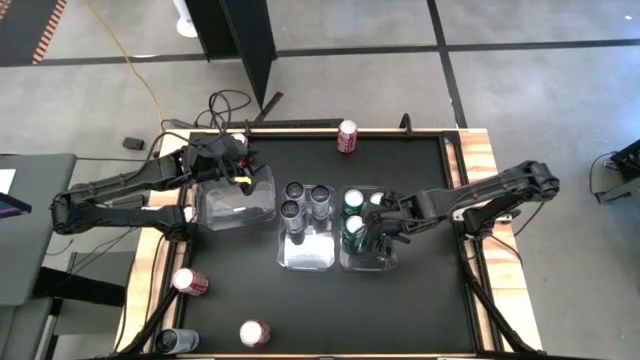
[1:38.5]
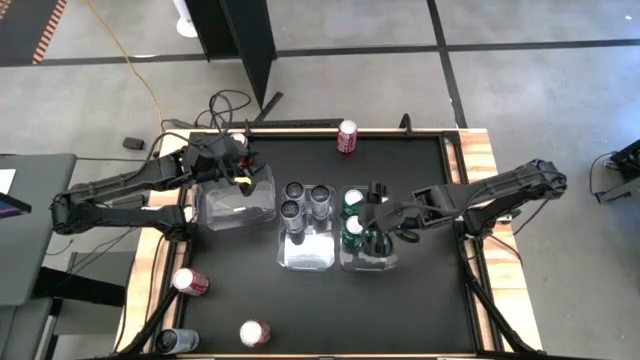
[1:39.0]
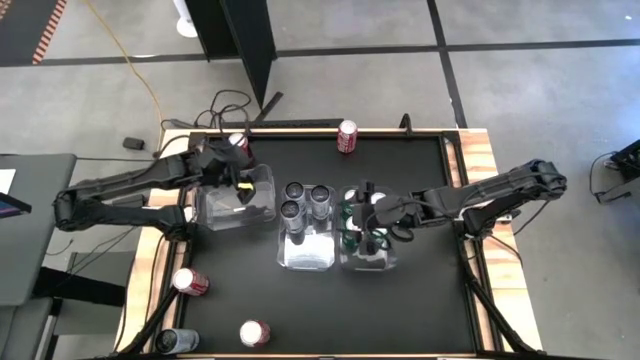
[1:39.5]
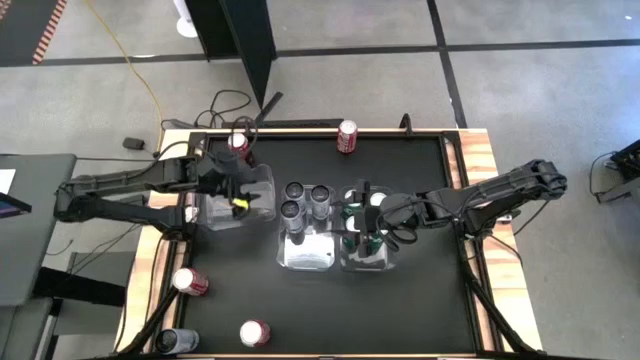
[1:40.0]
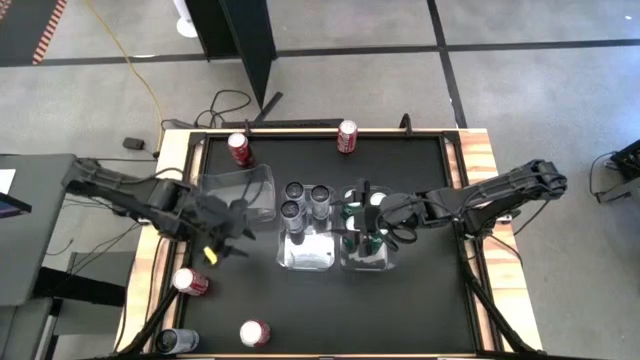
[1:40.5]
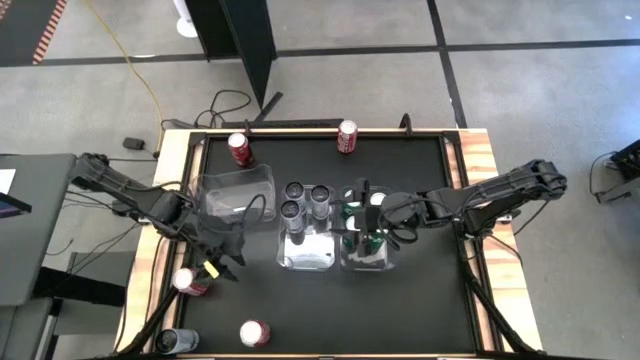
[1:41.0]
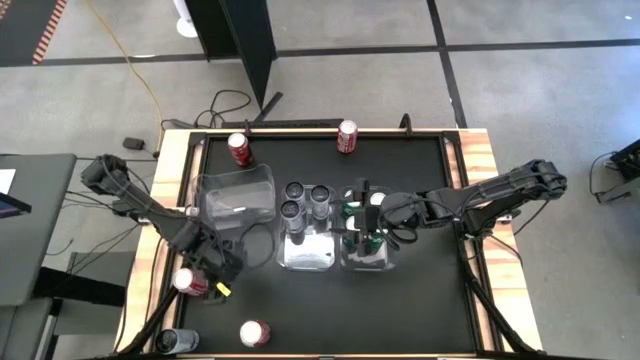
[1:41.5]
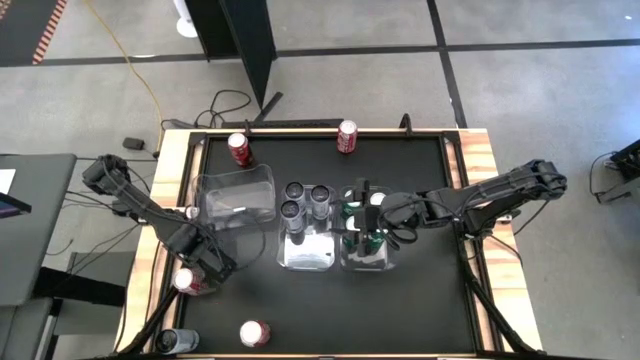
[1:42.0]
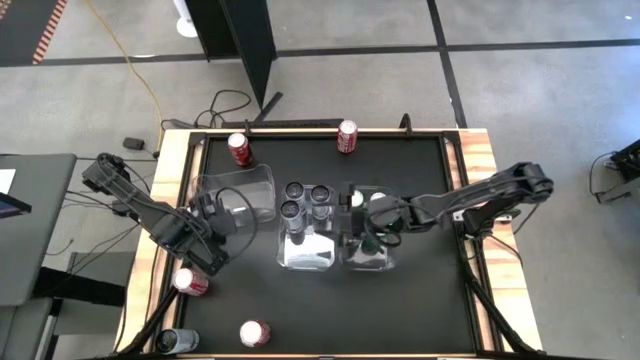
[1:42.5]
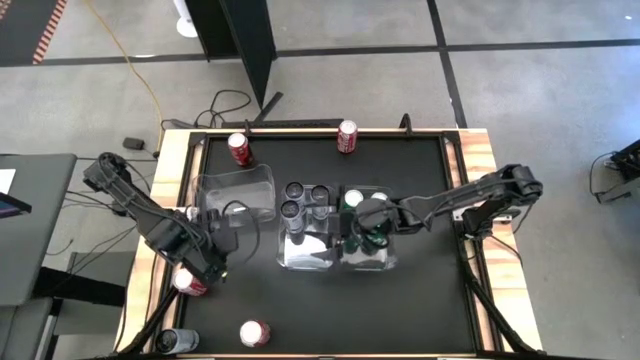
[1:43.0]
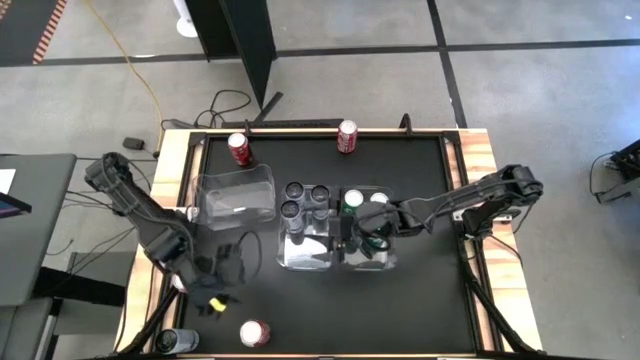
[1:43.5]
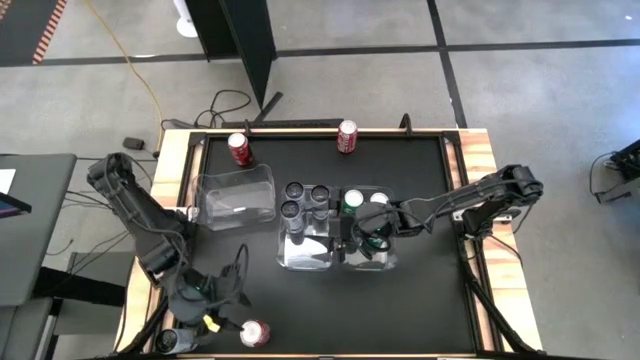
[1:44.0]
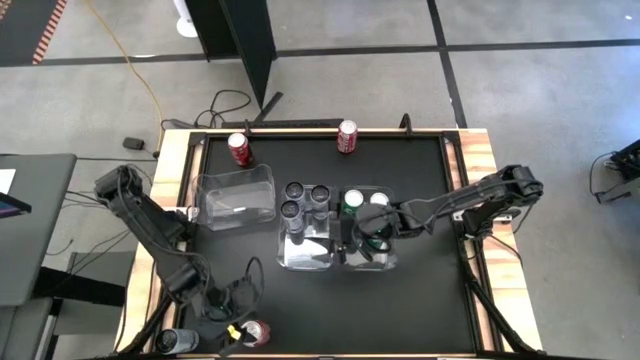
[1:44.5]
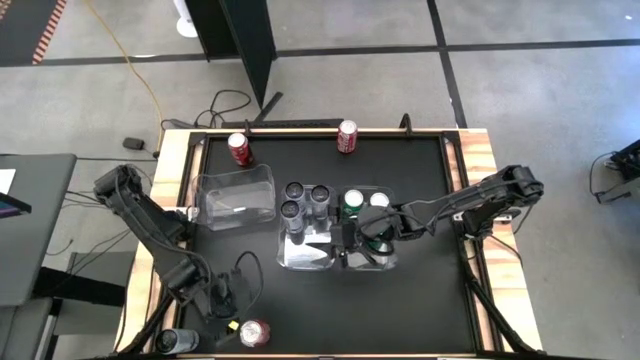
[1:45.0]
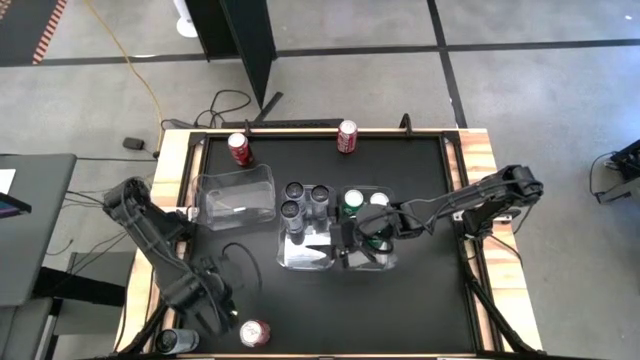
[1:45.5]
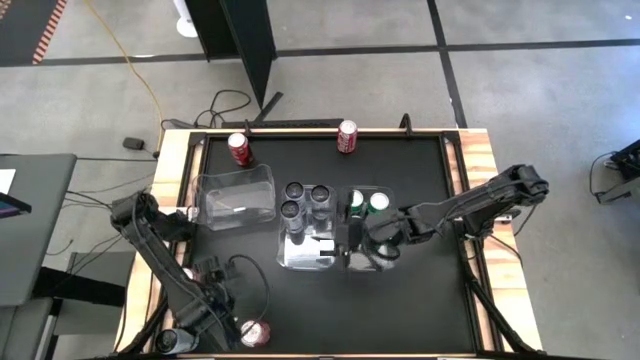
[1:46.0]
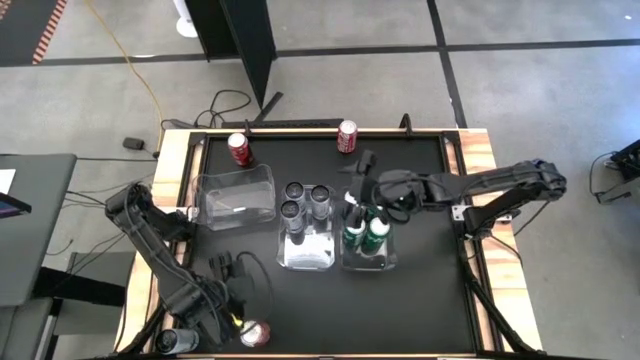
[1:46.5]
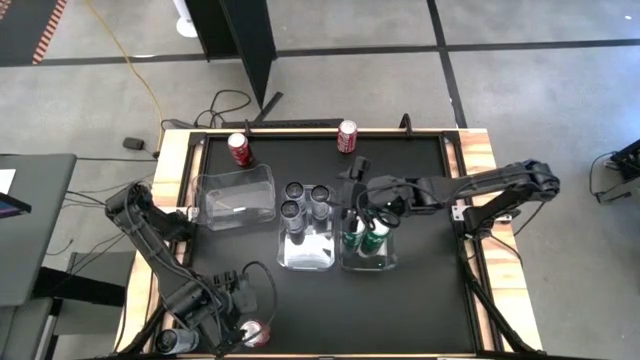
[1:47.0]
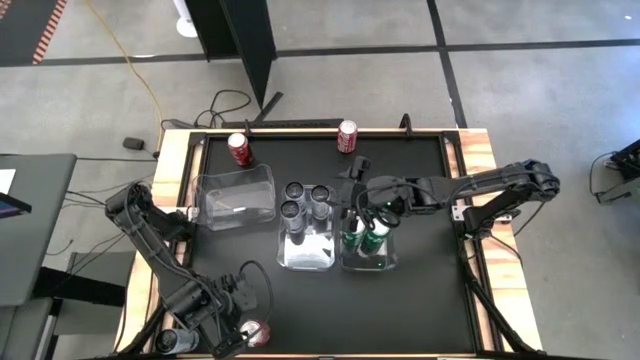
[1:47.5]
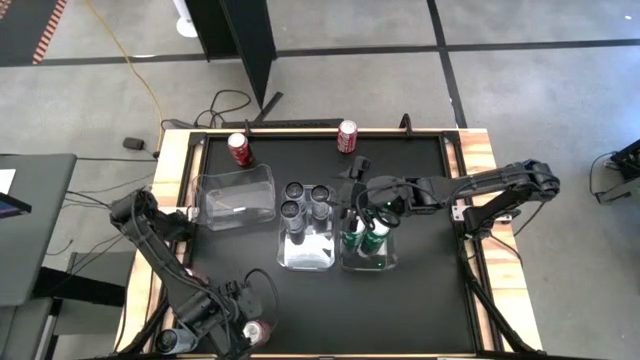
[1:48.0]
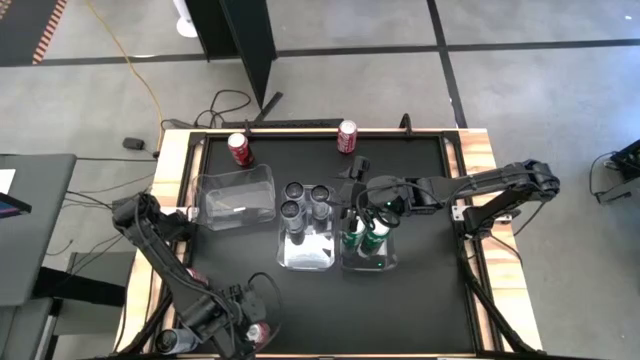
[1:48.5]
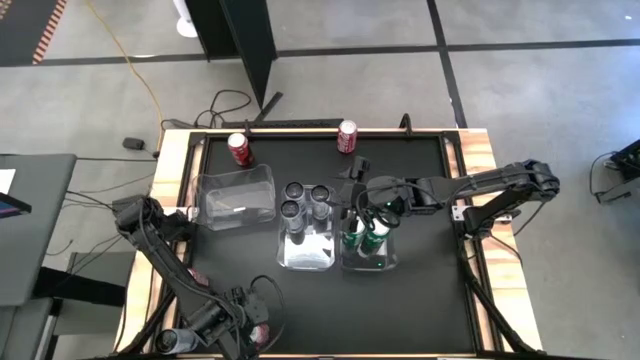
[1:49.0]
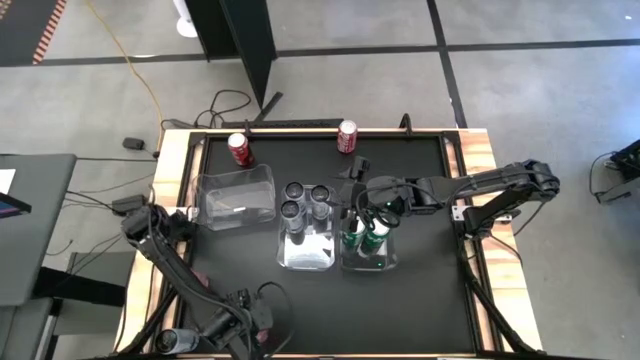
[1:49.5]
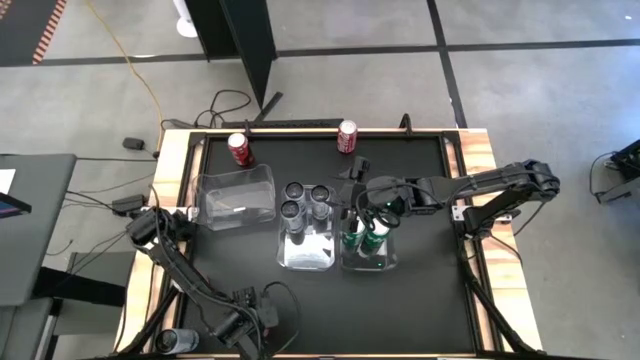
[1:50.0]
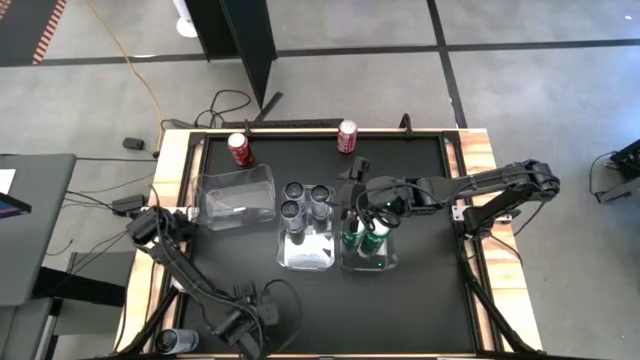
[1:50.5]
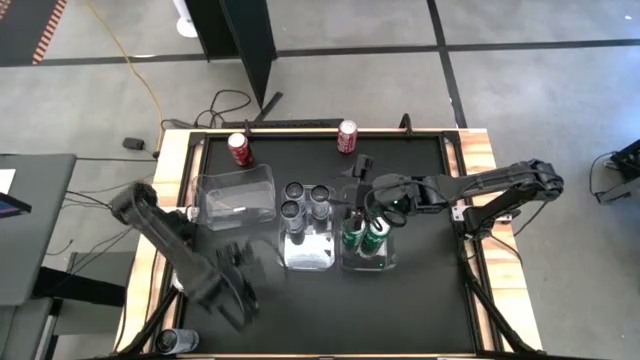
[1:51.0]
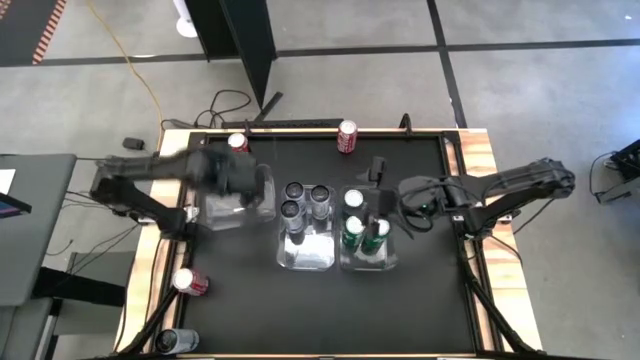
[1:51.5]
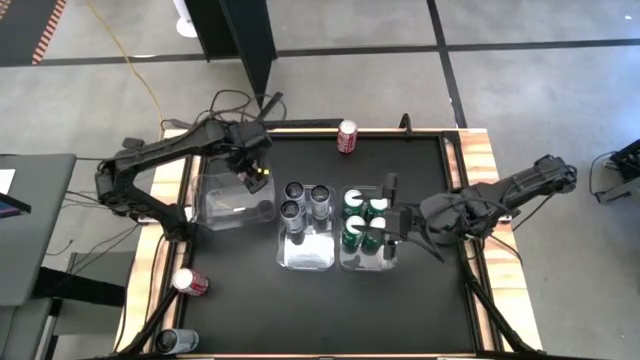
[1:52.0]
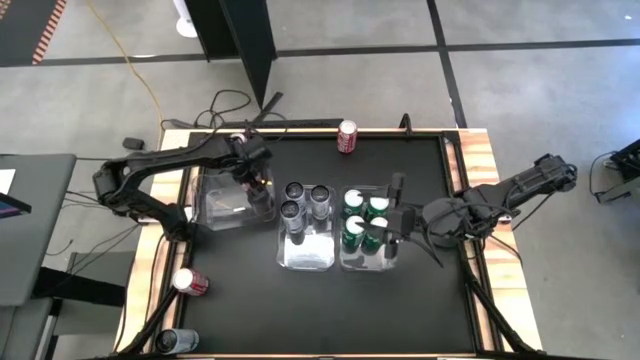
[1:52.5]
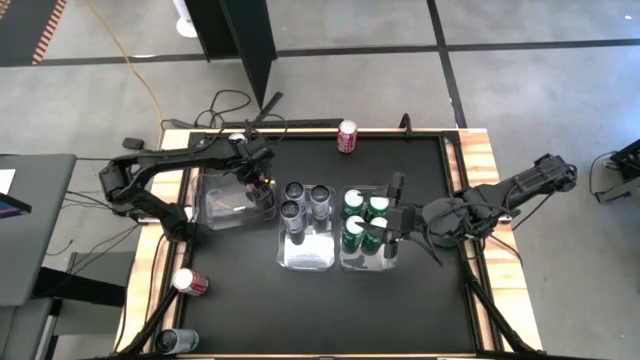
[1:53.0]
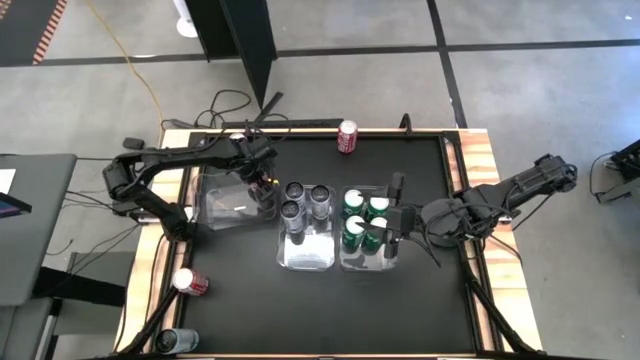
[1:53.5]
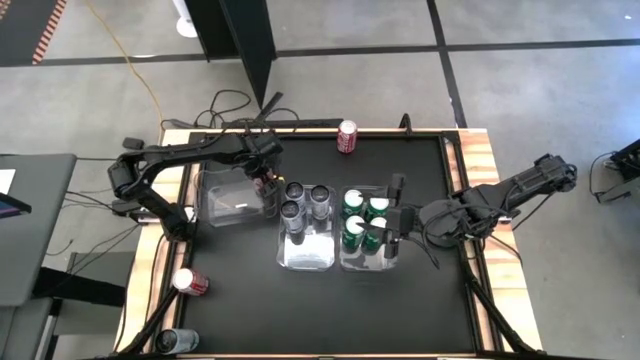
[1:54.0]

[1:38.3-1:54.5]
Task: Sort soda cans
Put the bottom left red soda can into the left transparent bin

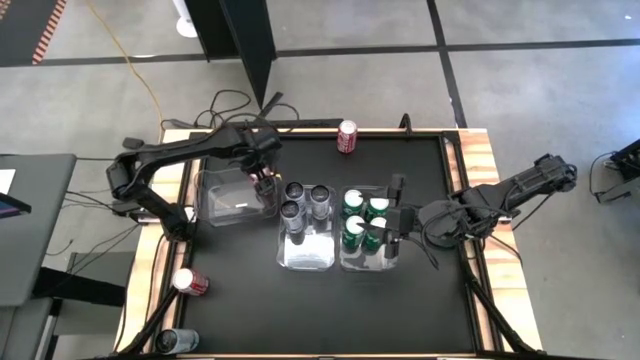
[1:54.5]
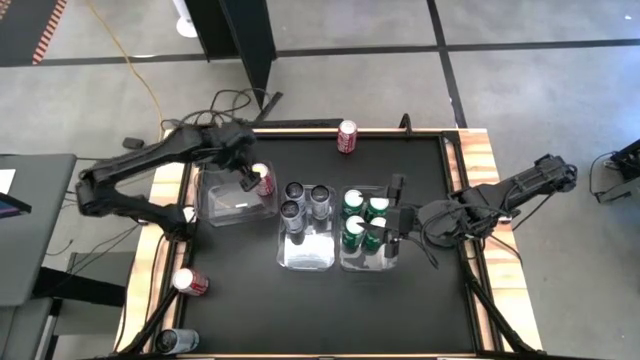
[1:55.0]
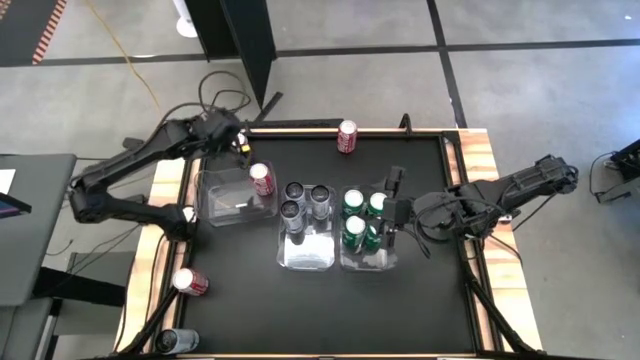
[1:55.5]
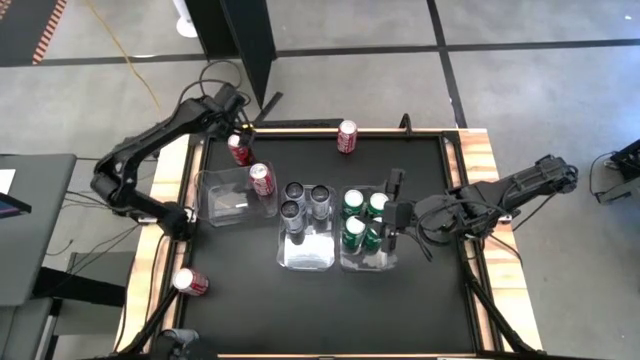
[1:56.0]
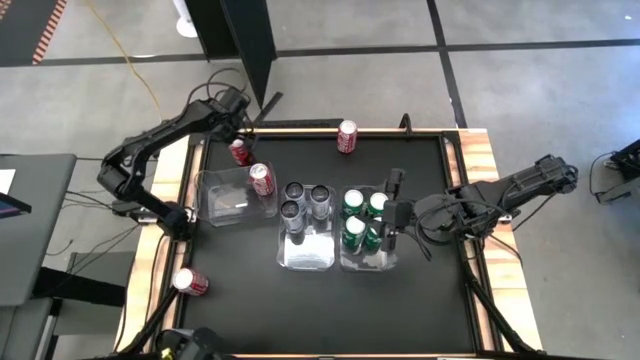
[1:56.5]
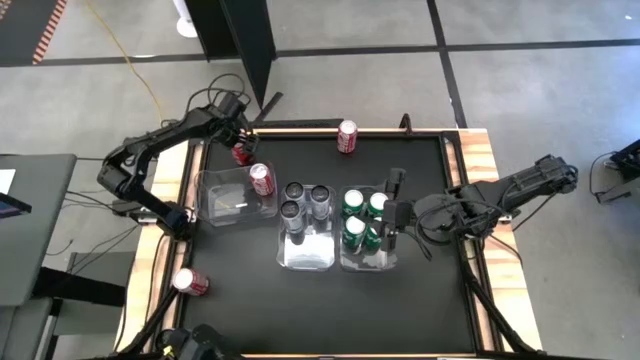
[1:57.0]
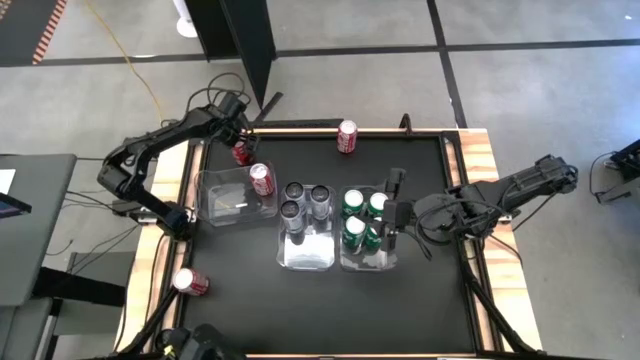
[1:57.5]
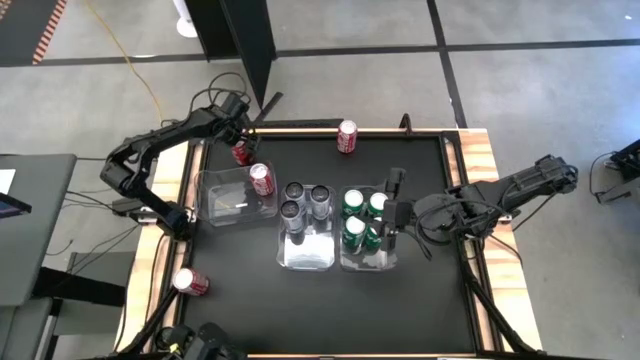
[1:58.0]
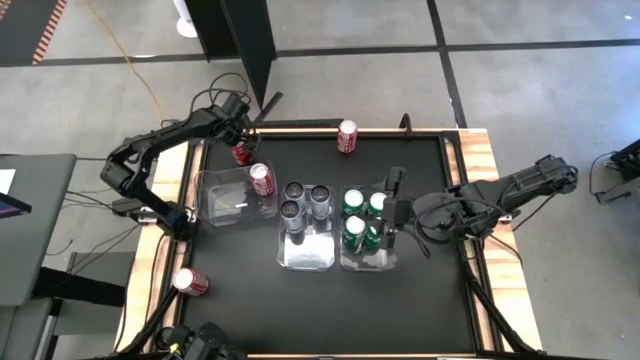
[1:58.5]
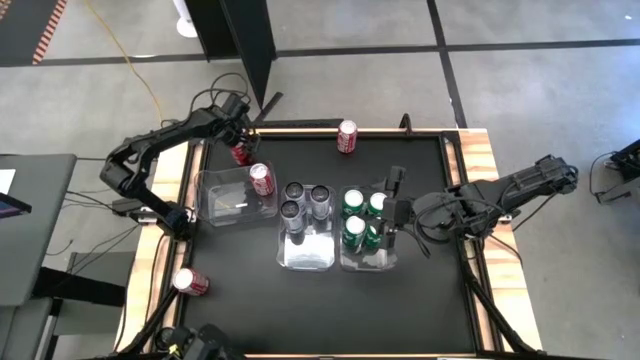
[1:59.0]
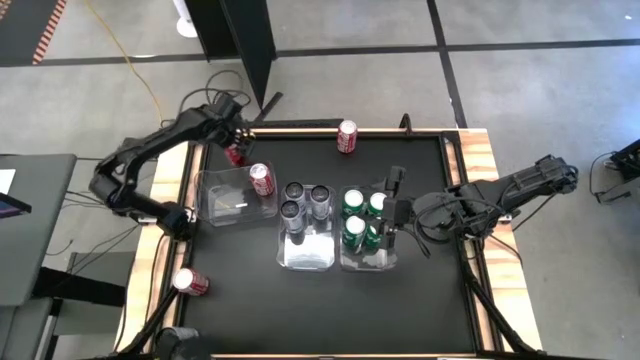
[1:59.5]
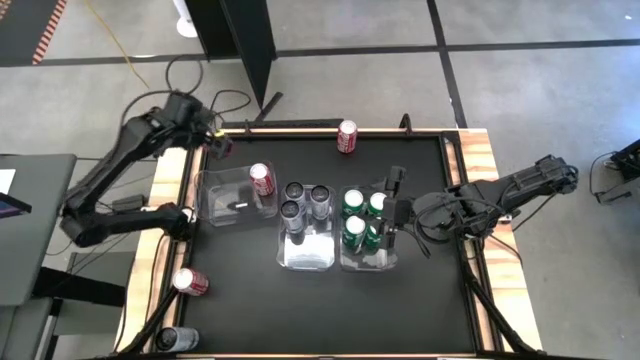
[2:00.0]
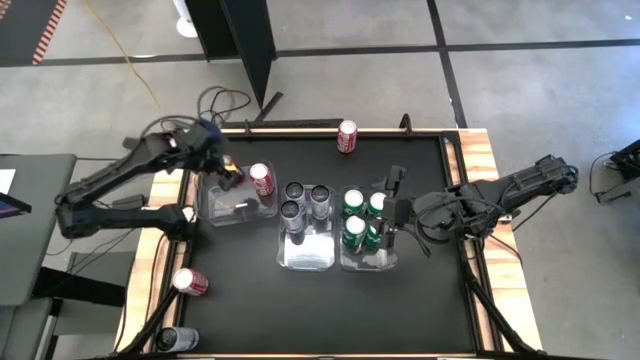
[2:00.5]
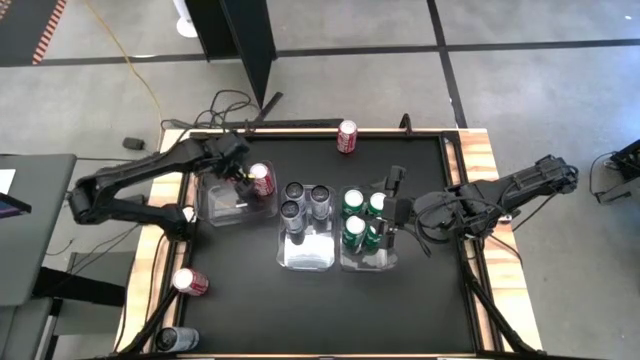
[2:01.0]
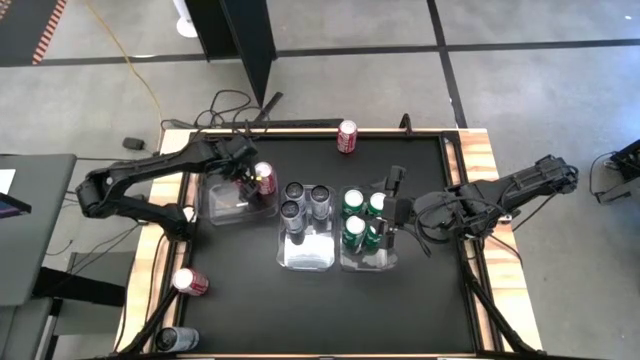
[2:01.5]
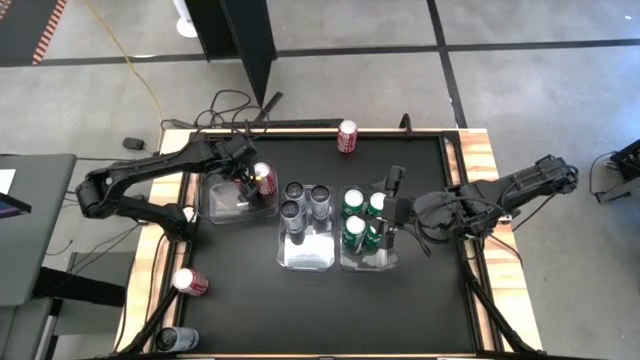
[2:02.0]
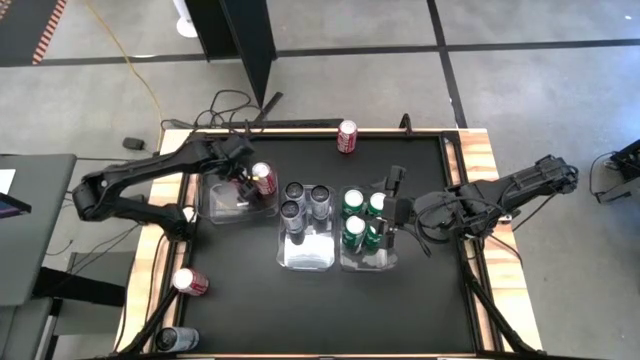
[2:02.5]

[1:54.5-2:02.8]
Put the top left red soda can into the left transparent bin
